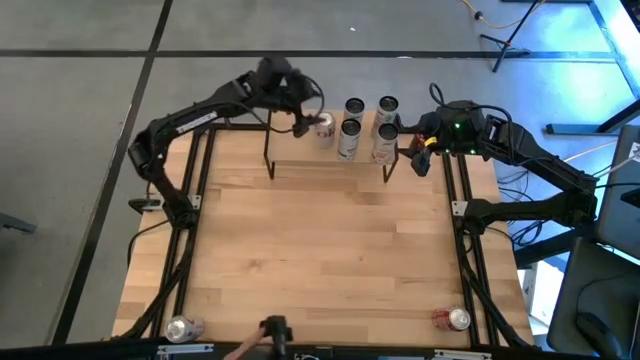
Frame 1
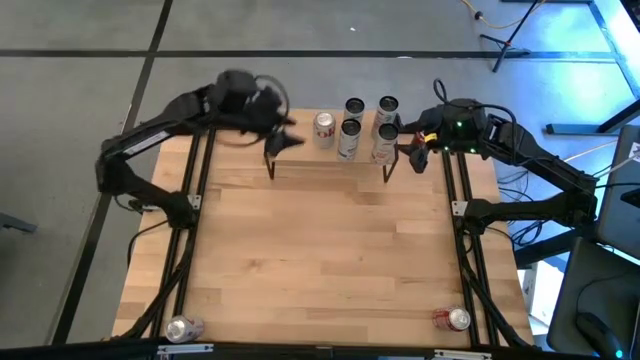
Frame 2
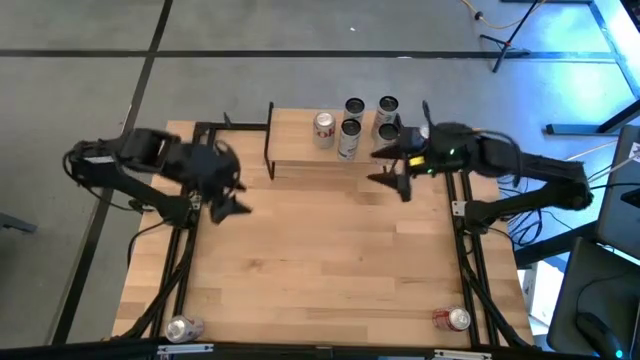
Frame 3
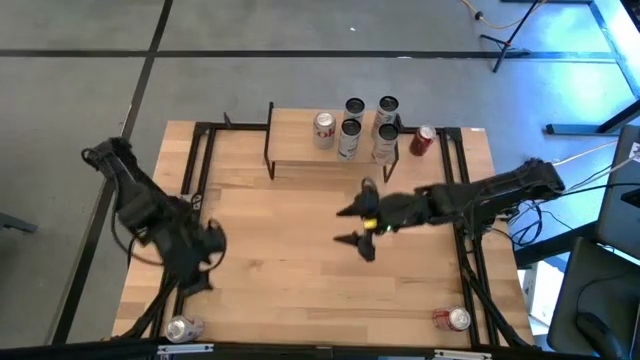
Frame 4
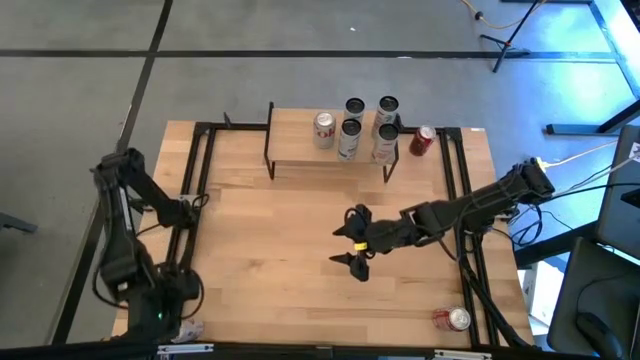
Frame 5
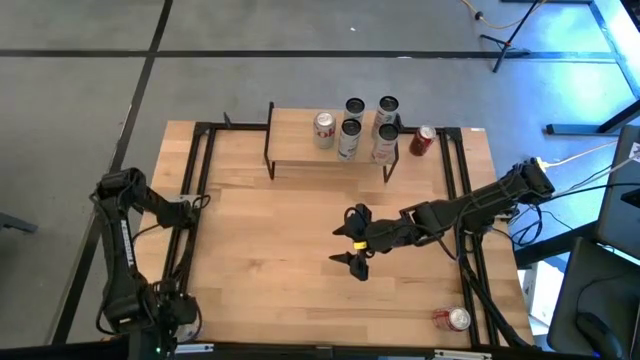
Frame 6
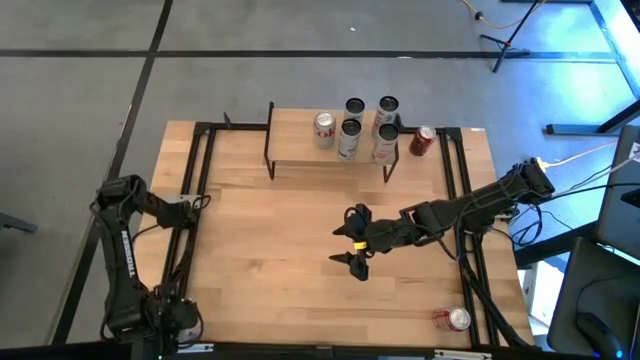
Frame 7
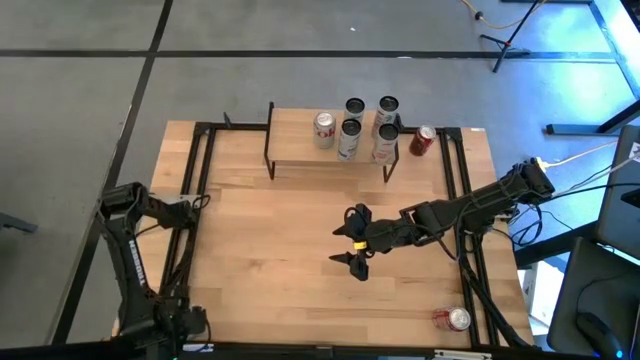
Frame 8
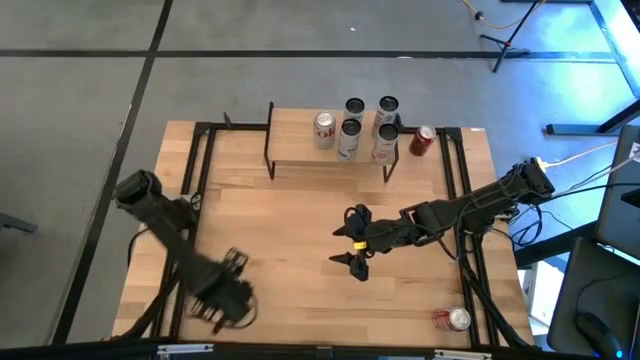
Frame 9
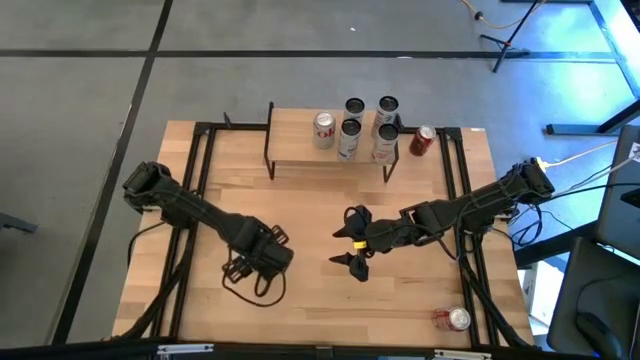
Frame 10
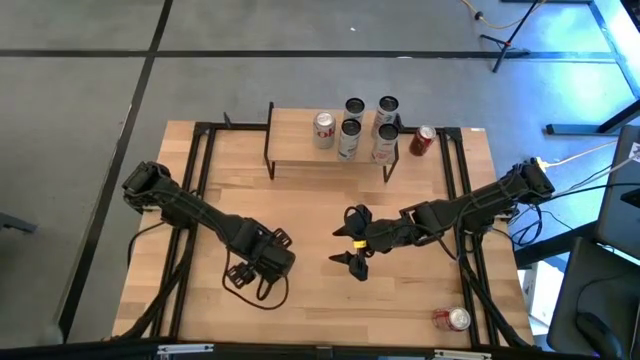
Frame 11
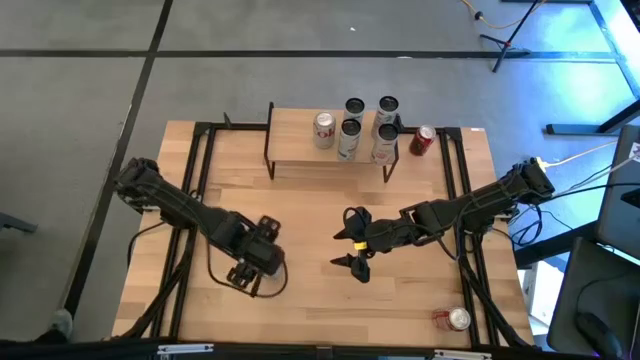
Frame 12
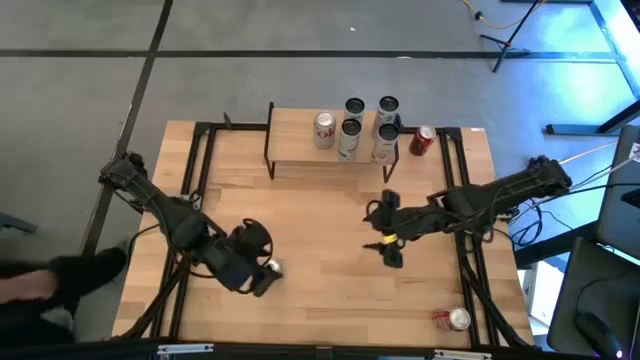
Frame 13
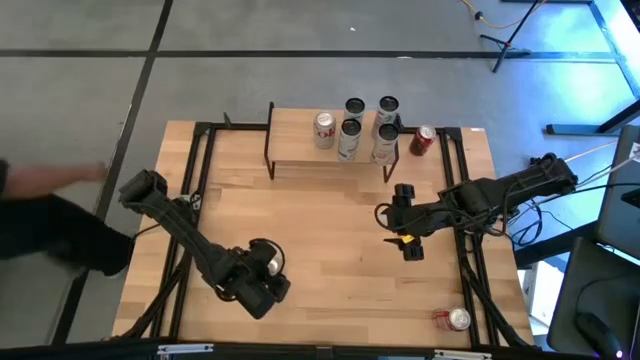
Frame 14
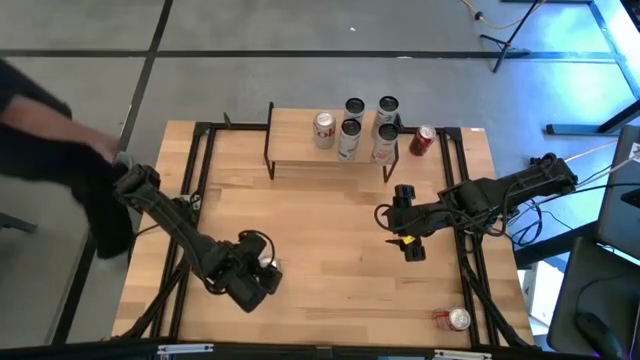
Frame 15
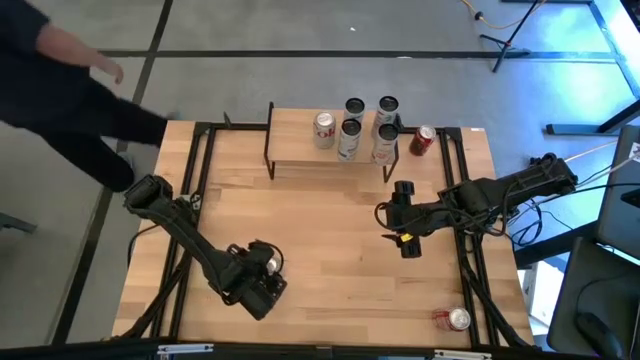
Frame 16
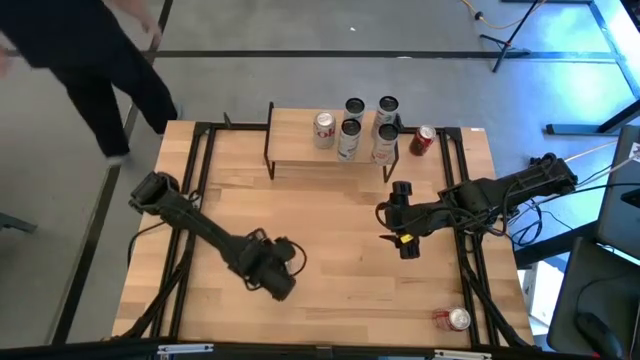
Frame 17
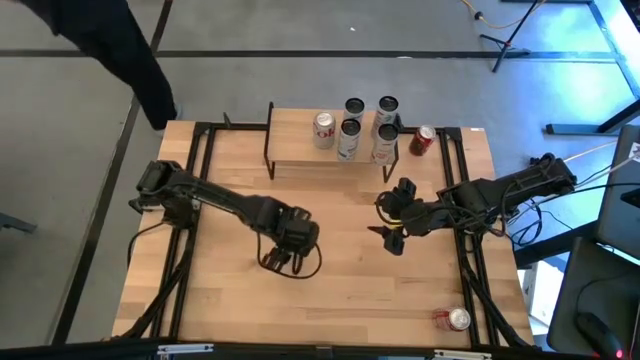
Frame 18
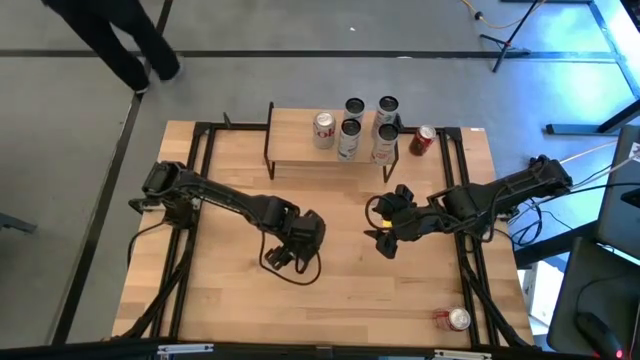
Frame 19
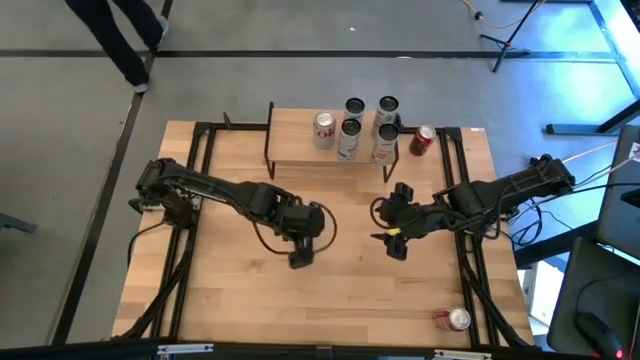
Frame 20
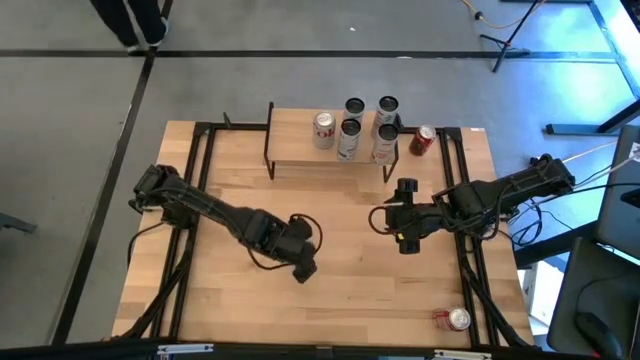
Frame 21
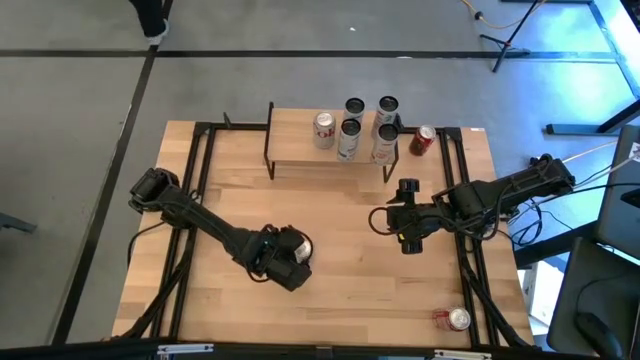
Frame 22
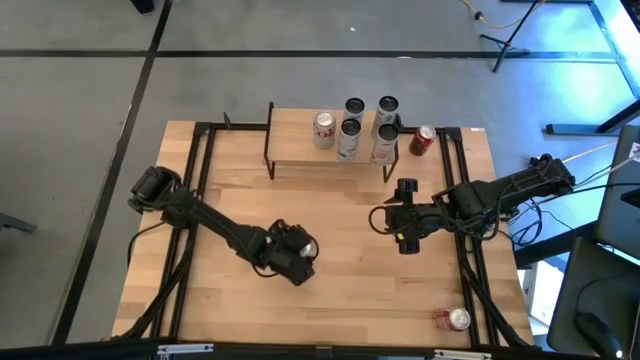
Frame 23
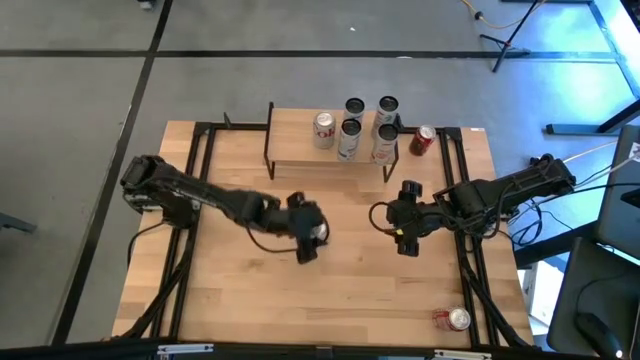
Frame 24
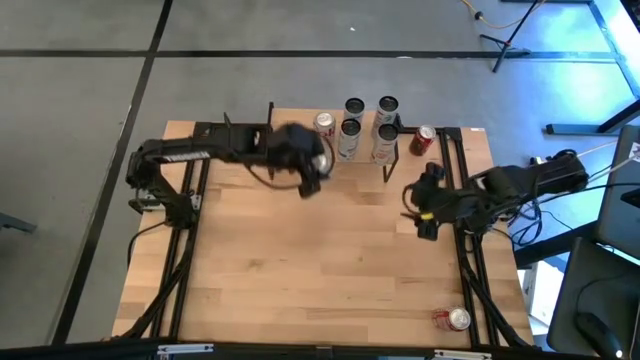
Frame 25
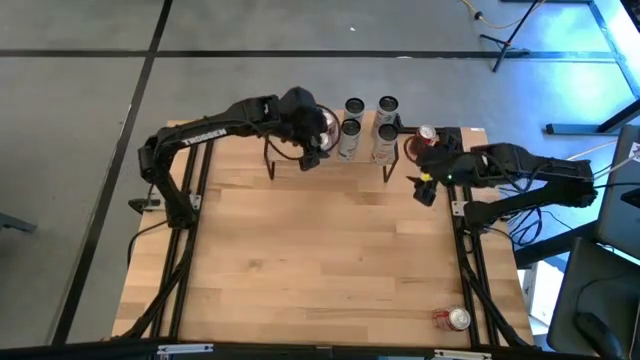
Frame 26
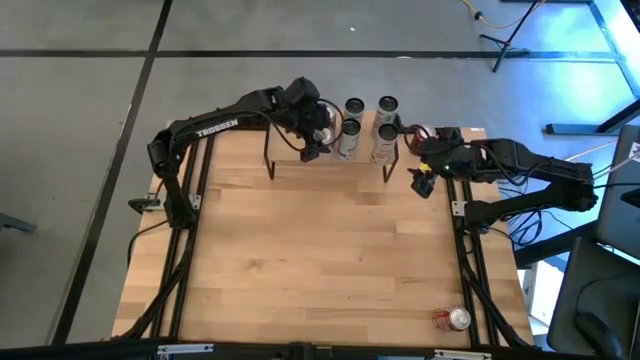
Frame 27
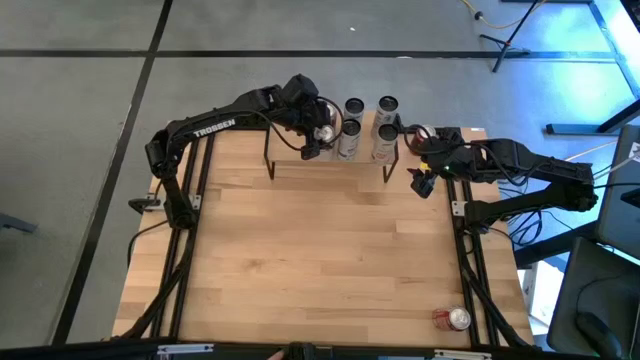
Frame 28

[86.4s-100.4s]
Task: Place canned beverage on shelf
Put the red-silver soda can on the shelf aligned with the other red-silver soda can

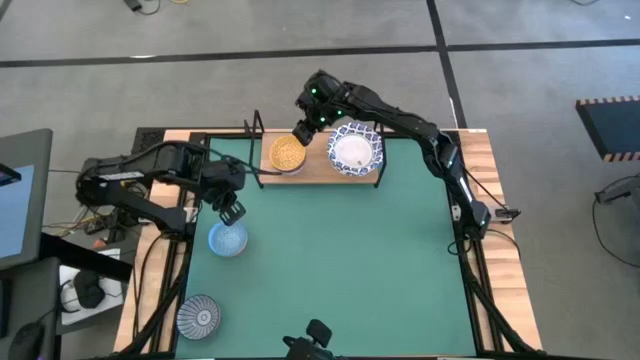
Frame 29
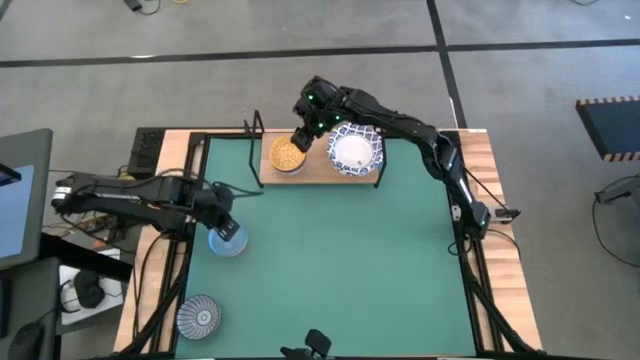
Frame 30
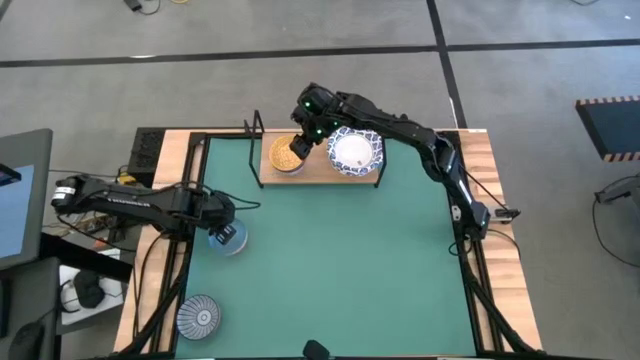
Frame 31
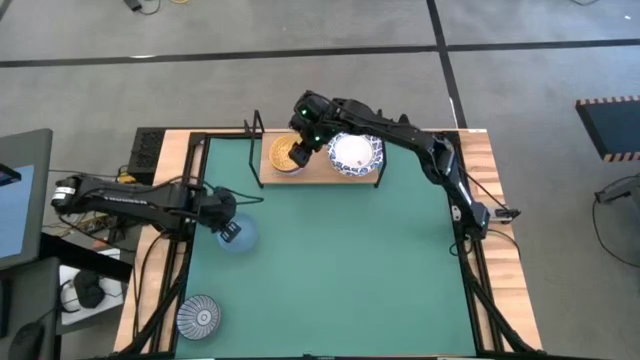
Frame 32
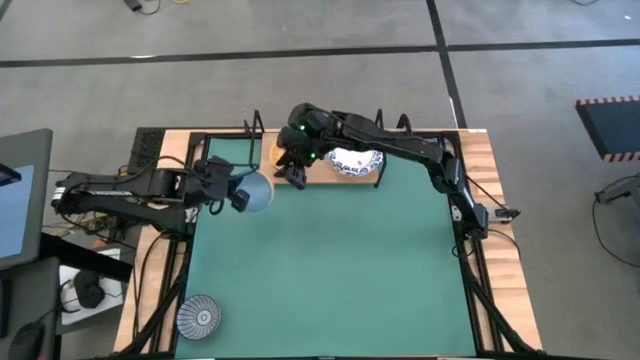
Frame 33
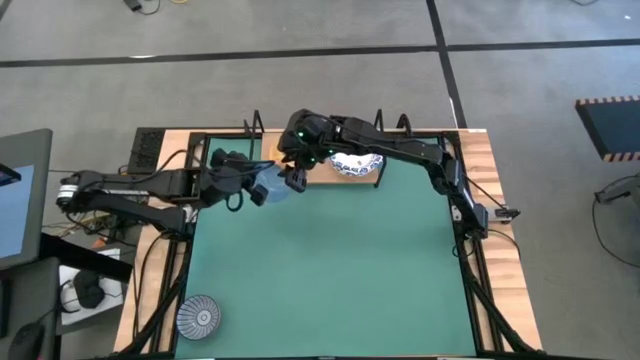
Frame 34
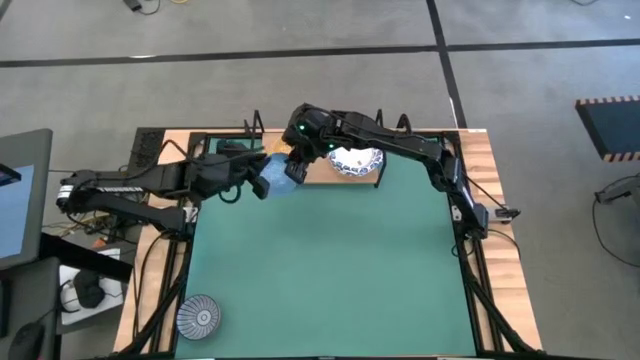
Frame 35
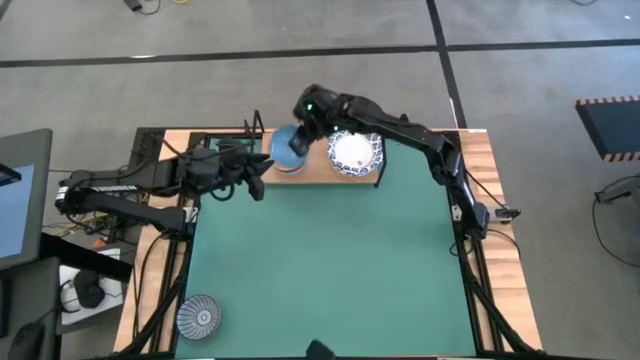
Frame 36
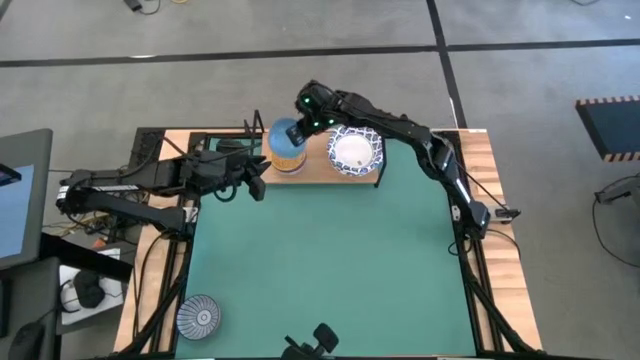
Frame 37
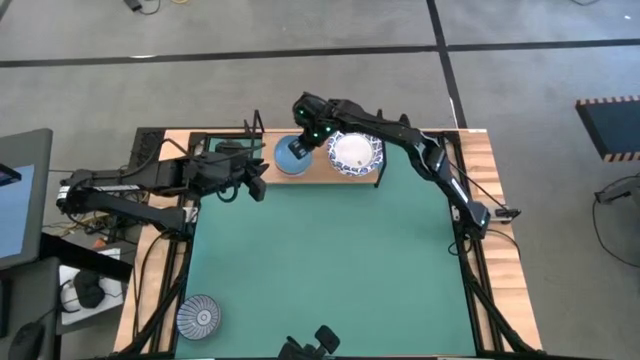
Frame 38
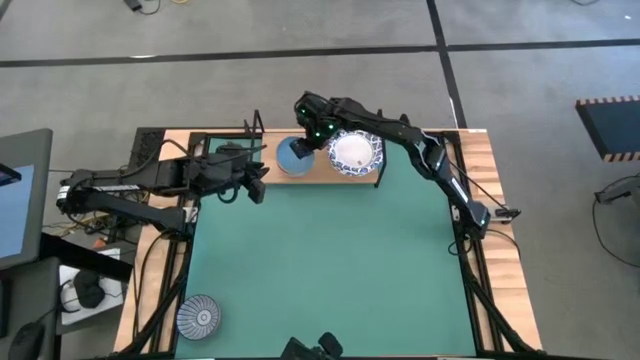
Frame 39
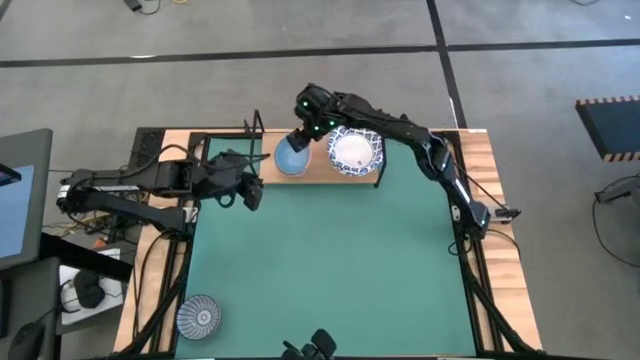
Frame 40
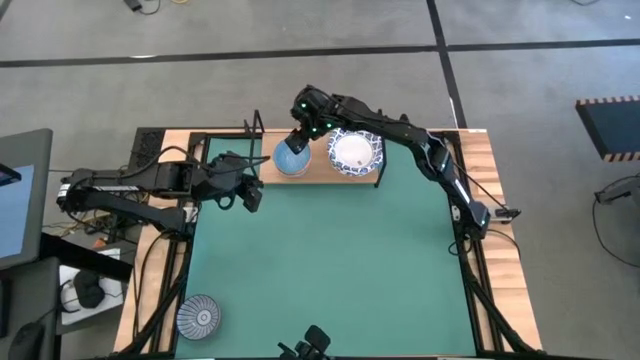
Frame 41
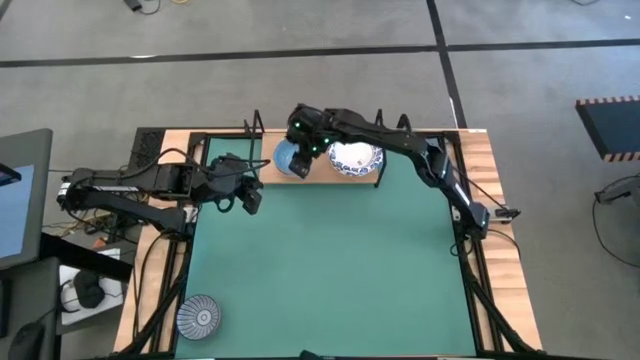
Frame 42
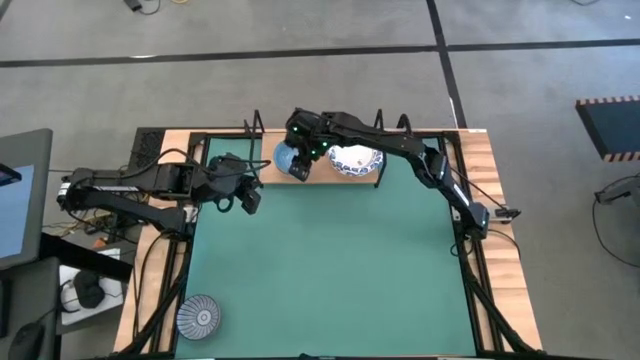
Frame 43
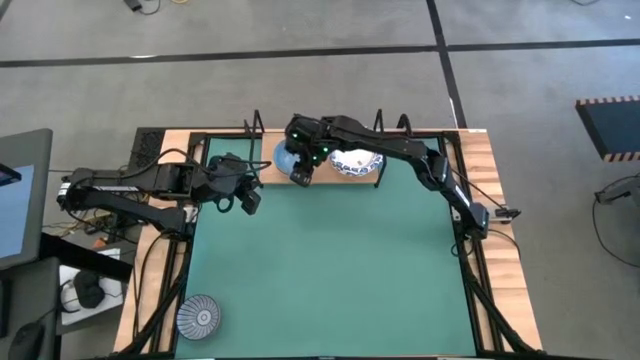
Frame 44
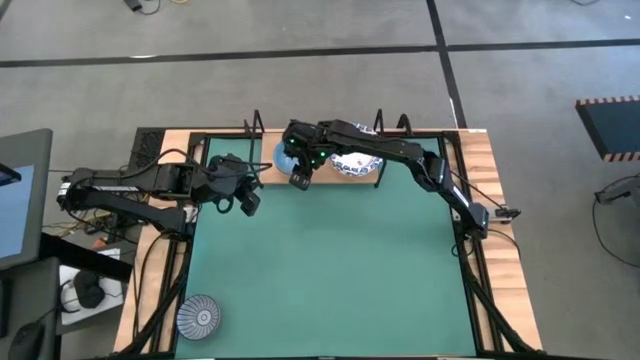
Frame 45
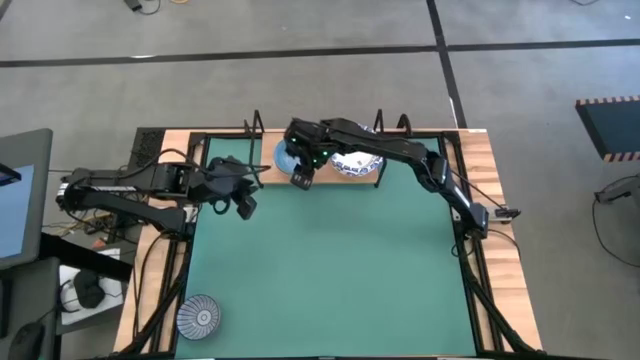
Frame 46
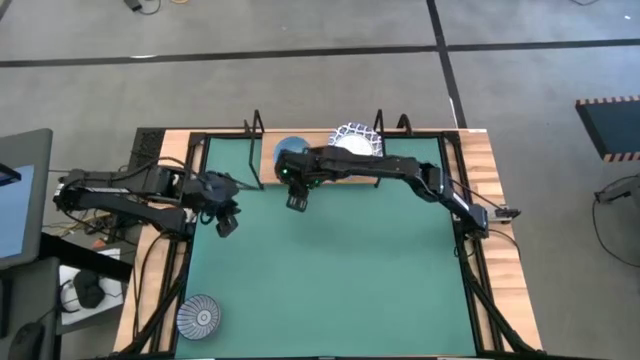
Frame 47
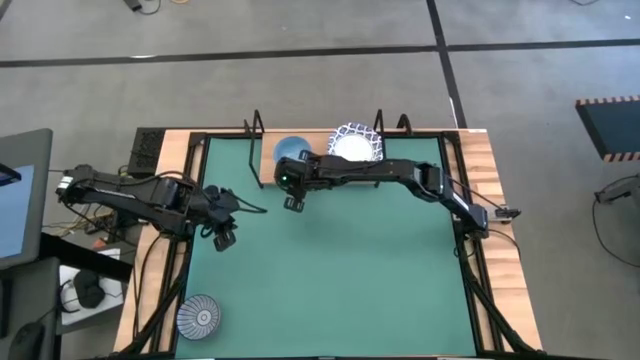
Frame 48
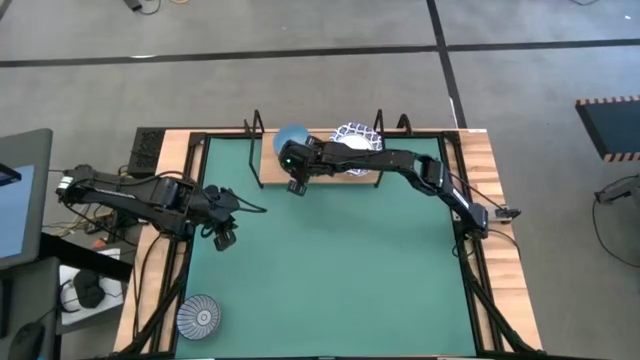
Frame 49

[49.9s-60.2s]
Task: Place and stack bowls onto a shelf
Stack the light blue bowl on top of the yellow bowl on the shelf
